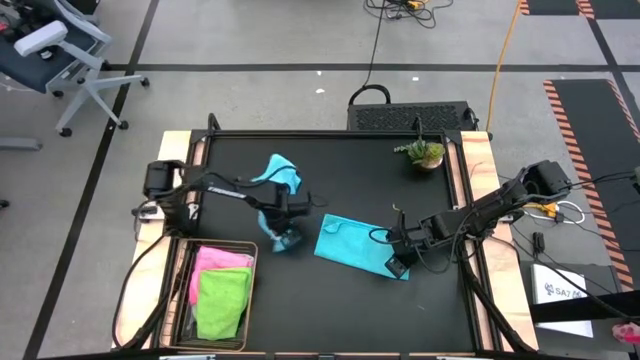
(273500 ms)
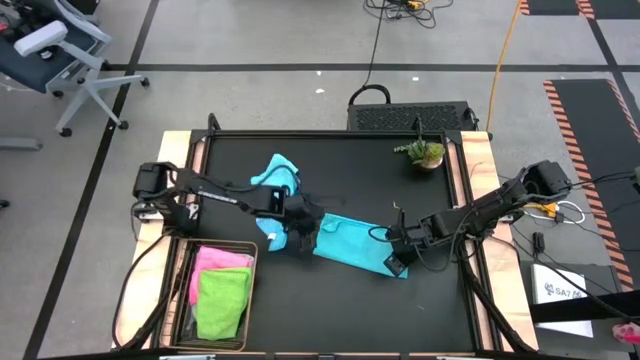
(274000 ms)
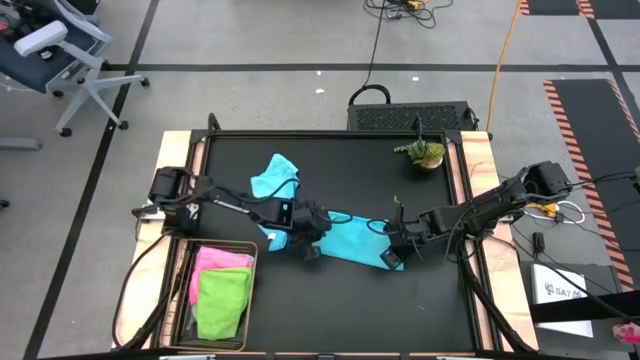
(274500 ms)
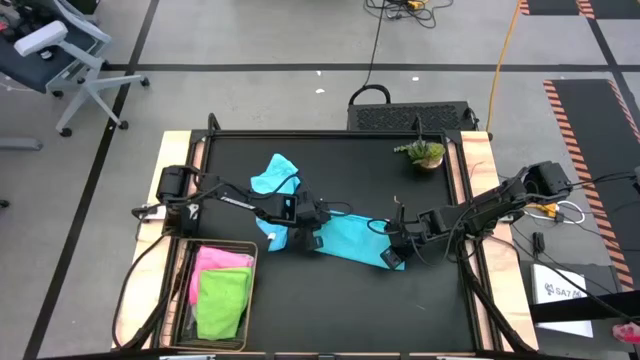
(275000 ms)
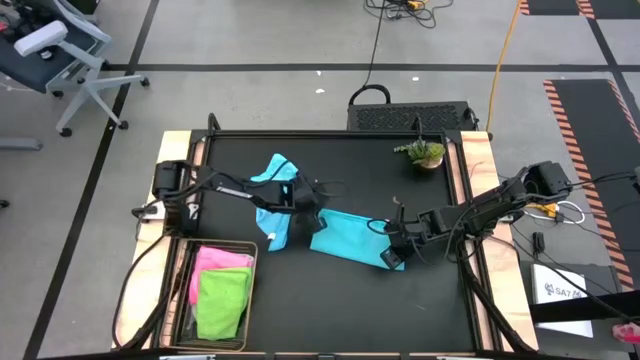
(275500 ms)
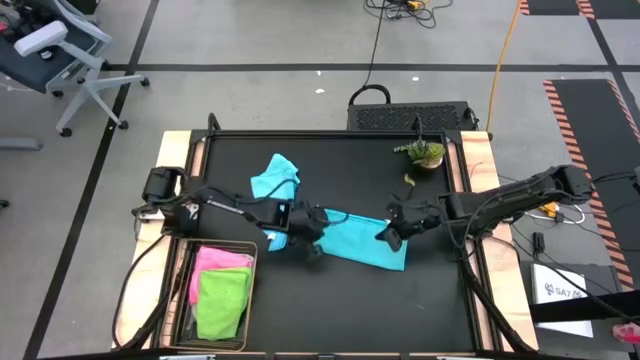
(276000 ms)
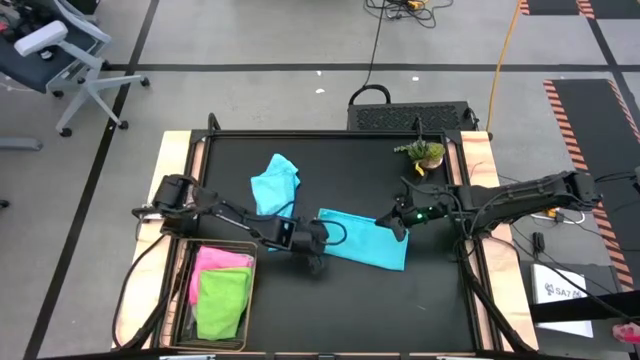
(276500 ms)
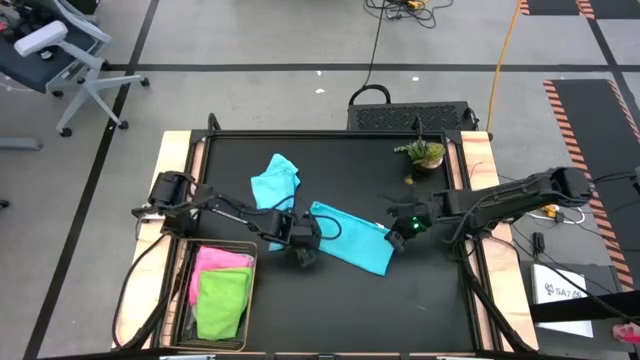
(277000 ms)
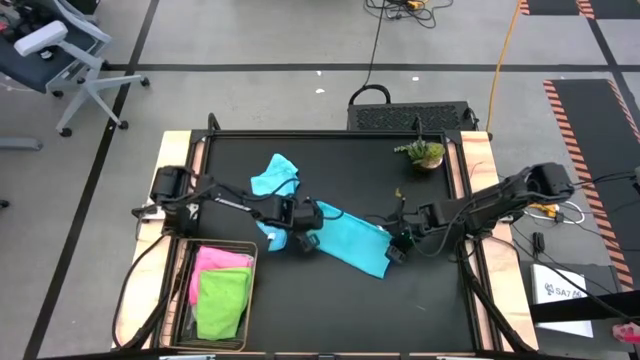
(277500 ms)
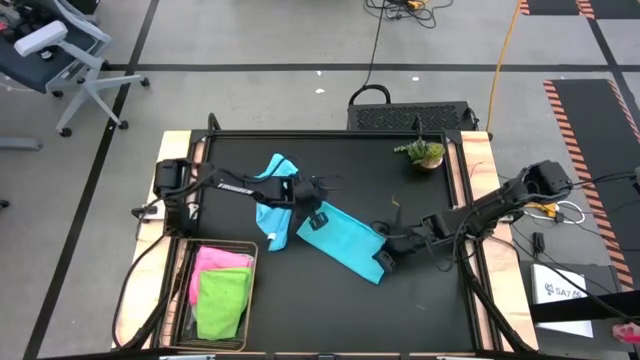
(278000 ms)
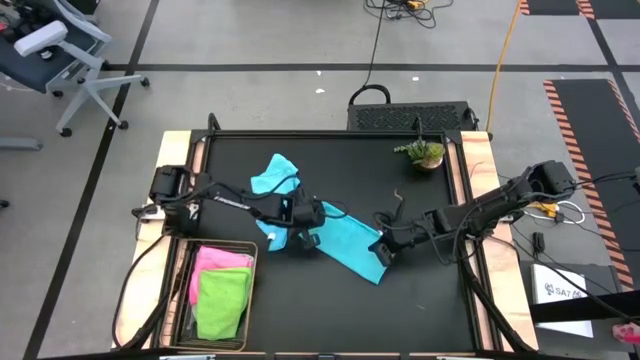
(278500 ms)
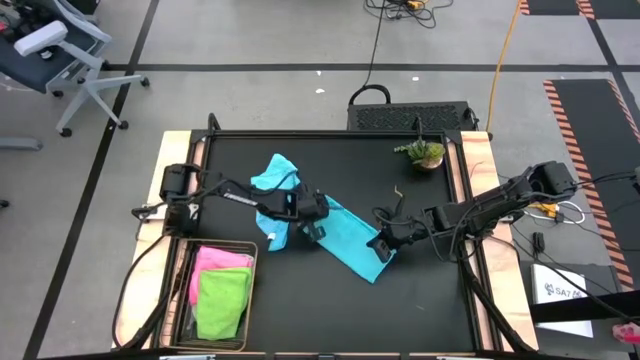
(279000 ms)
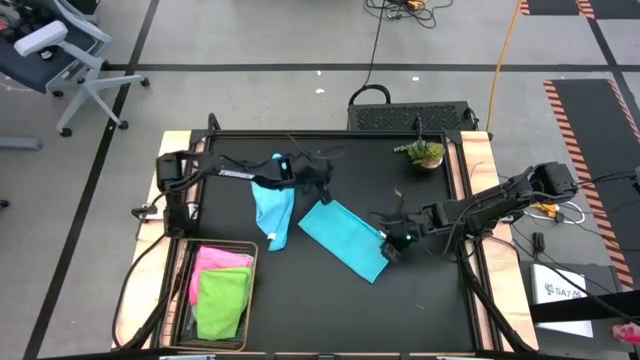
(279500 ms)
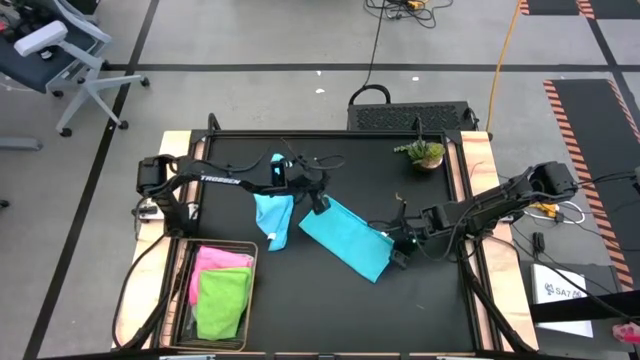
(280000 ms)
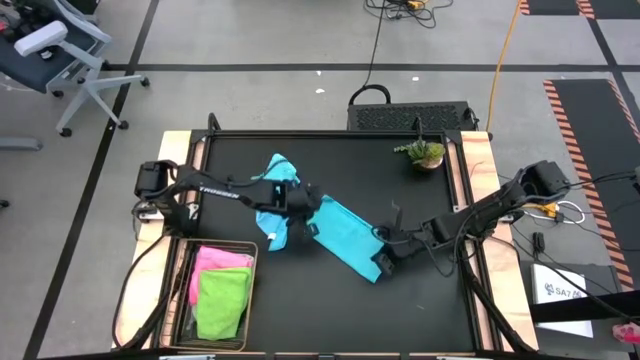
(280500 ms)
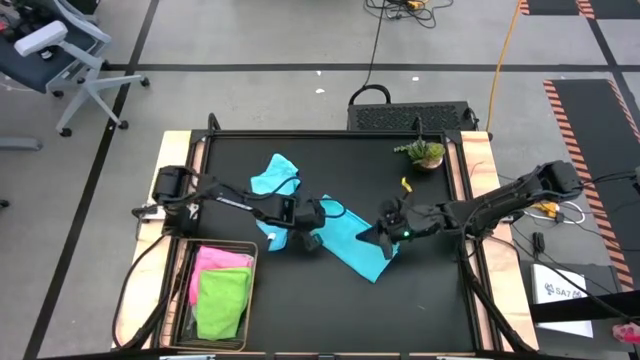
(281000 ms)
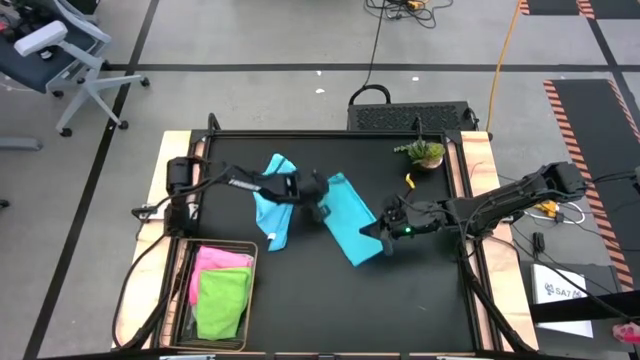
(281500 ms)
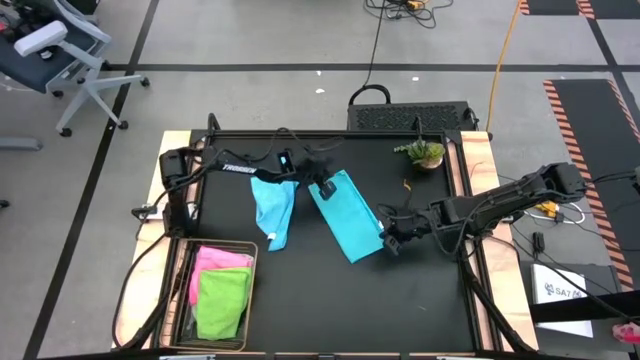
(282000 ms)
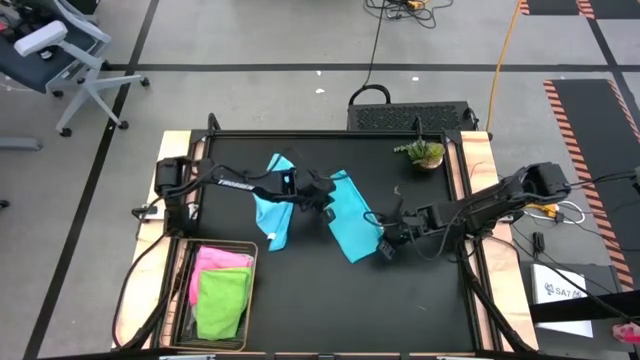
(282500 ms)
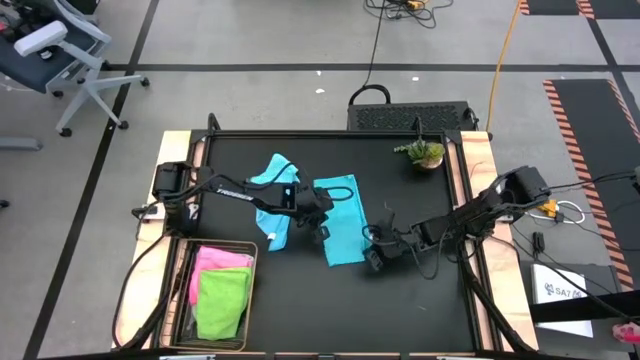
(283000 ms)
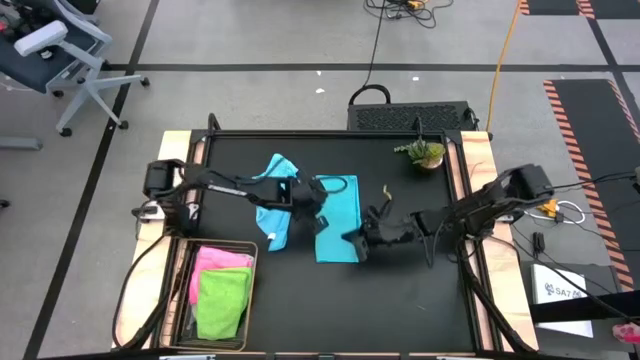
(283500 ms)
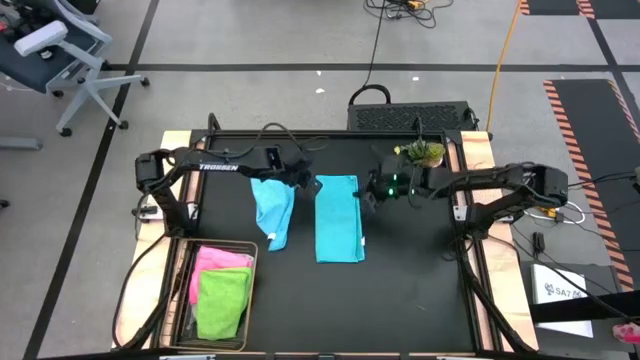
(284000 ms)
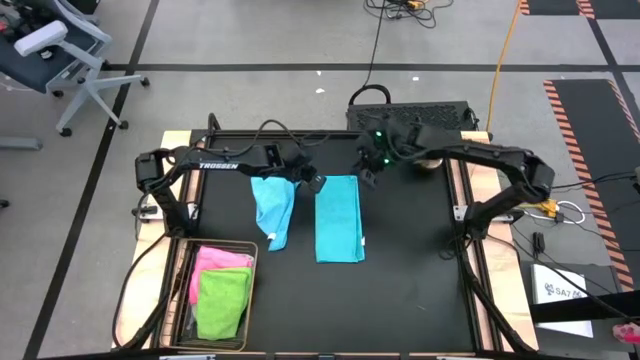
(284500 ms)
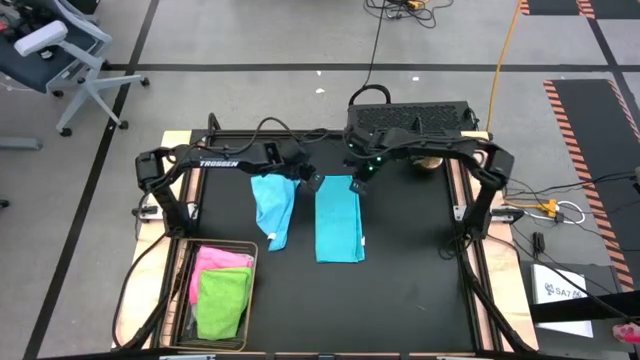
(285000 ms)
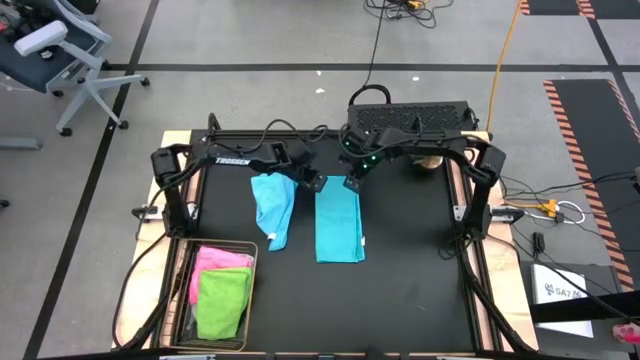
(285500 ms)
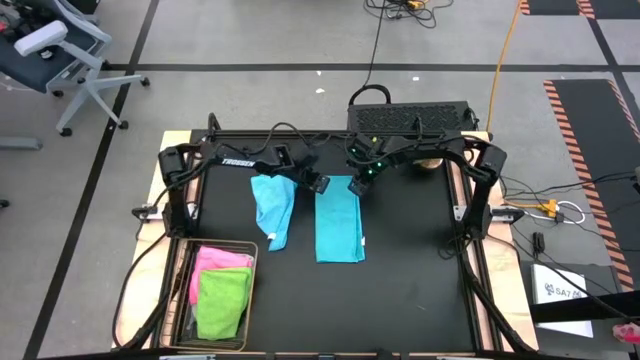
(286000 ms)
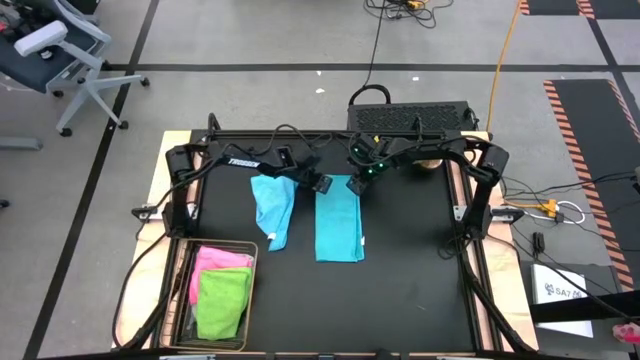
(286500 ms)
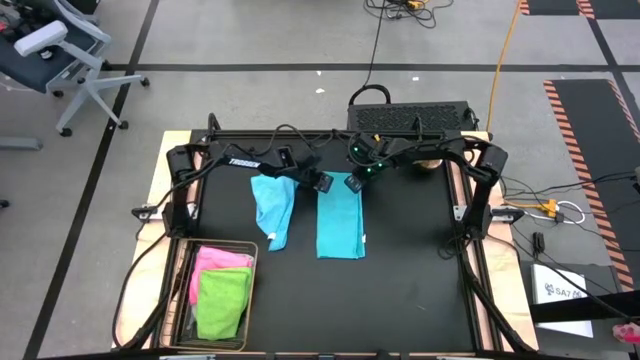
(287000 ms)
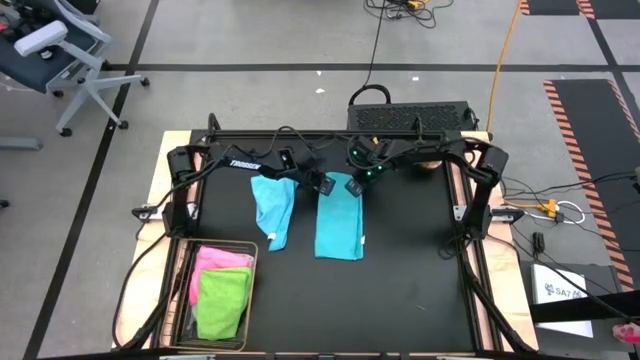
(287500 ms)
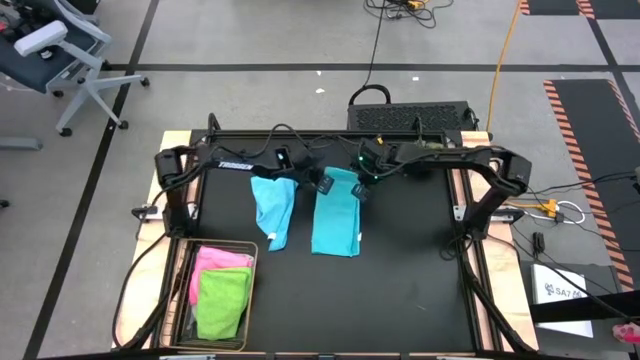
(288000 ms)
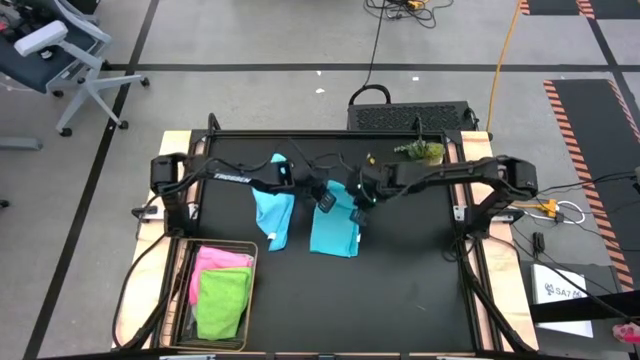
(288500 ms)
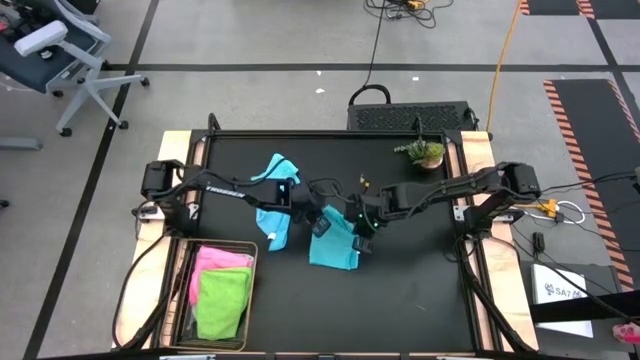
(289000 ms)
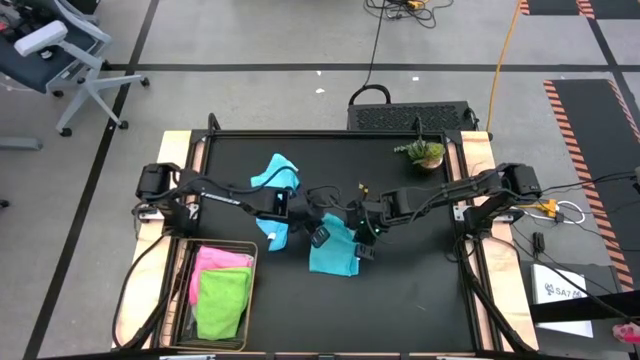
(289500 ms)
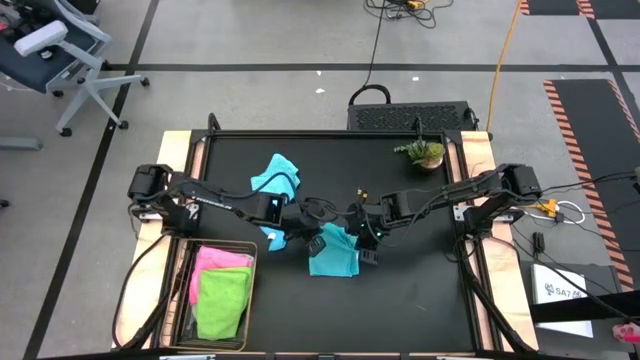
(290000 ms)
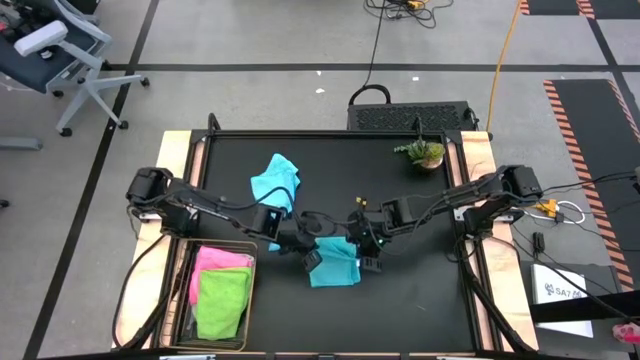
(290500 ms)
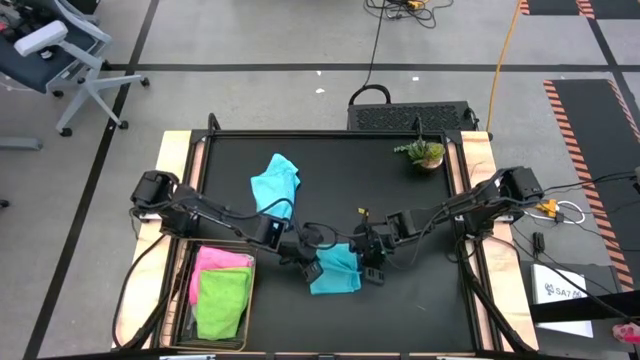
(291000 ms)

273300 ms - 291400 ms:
Task: Fold microfiber towels
Fold the right blue microfiber cloth

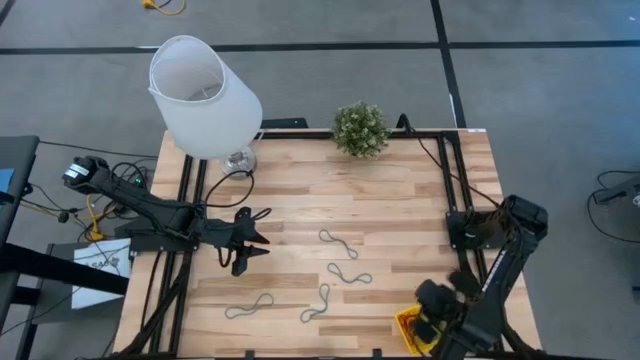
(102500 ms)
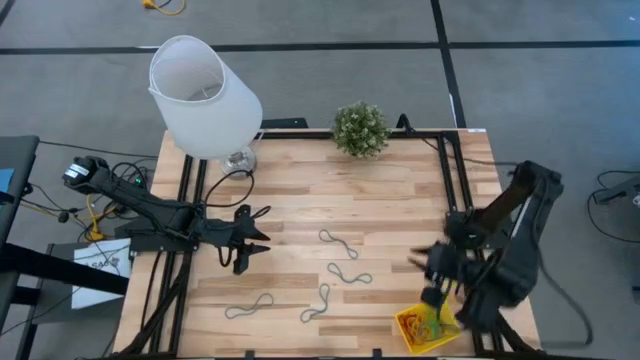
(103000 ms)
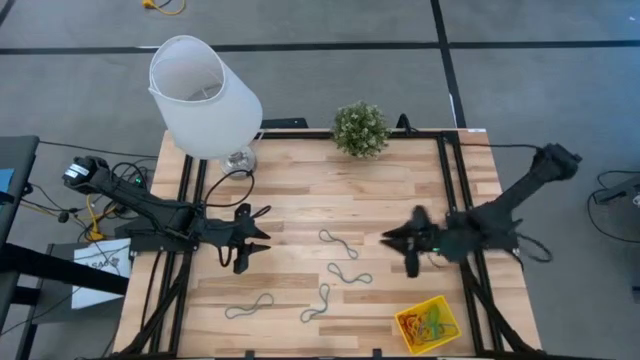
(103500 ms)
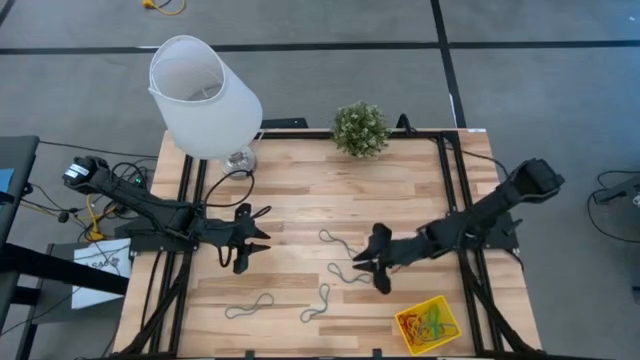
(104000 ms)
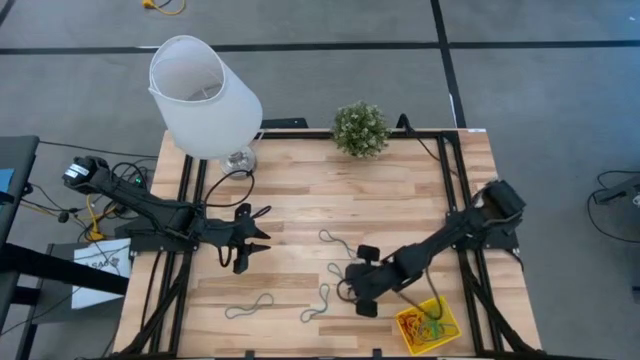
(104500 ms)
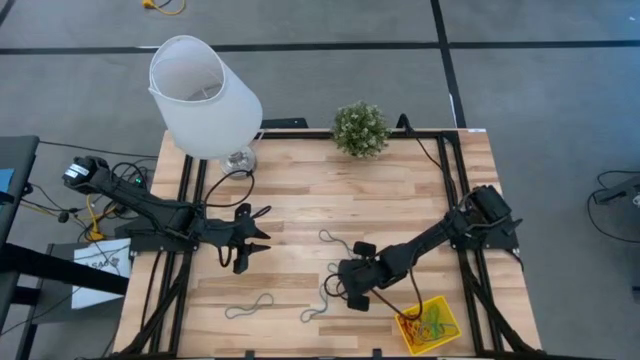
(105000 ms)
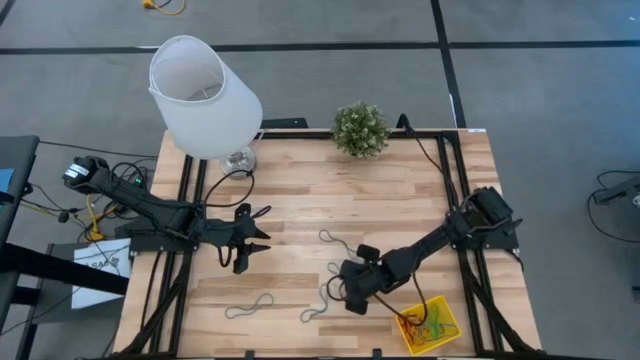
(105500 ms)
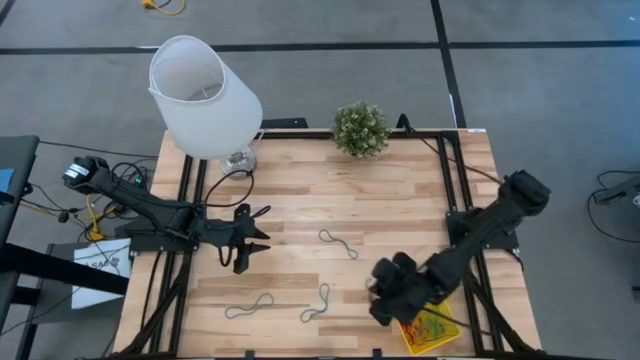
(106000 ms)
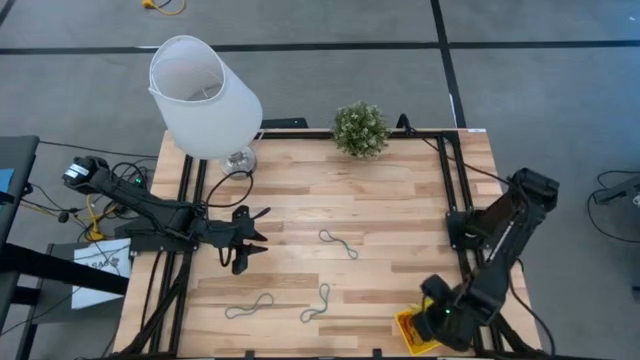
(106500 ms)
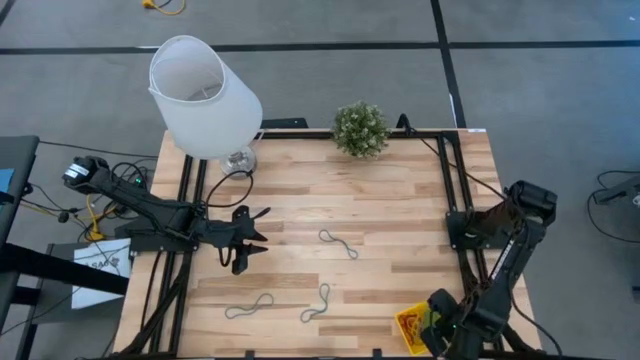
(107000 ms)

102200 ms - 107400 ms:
Task: Pick and place rubber bands into bin
Put the blue rubber band into the yellow basket
